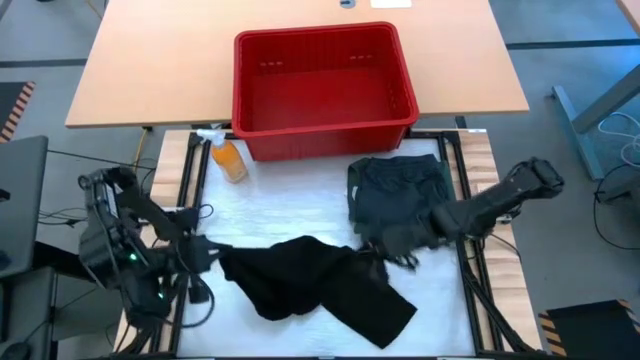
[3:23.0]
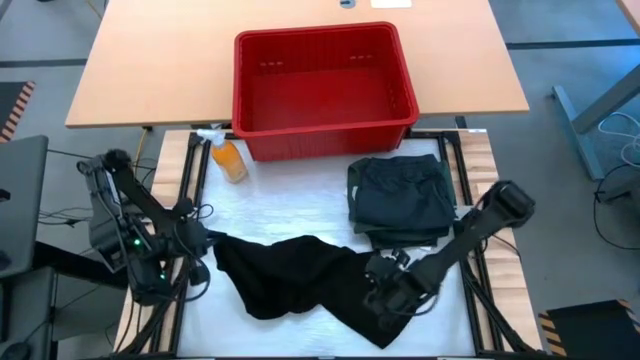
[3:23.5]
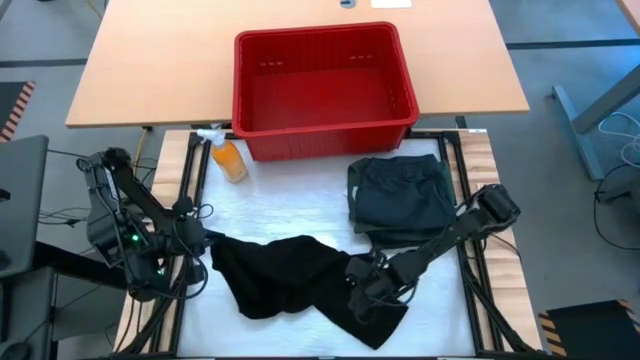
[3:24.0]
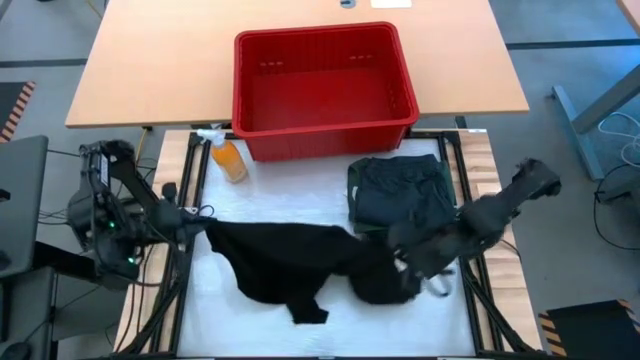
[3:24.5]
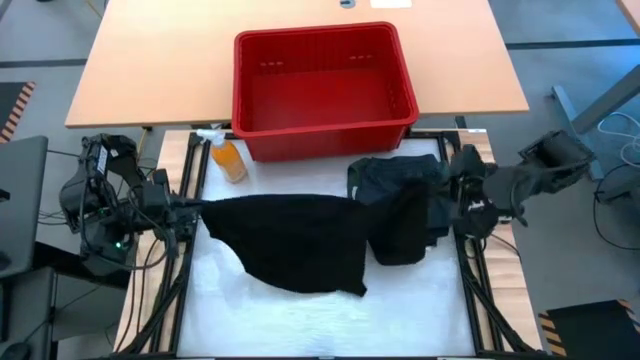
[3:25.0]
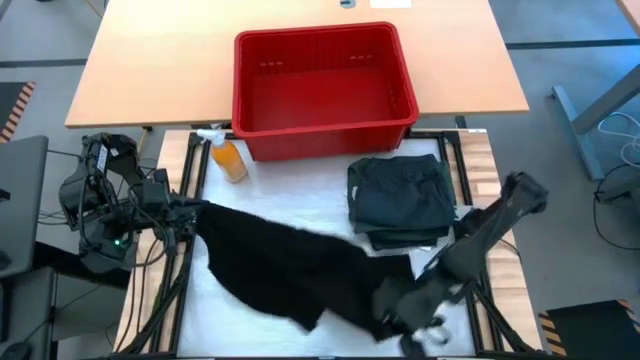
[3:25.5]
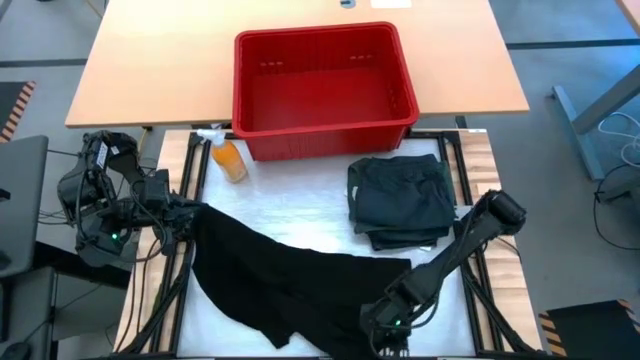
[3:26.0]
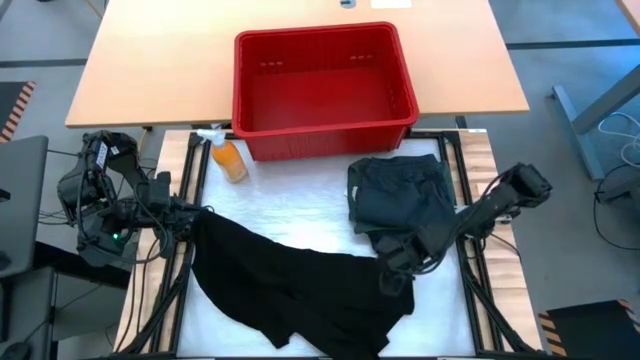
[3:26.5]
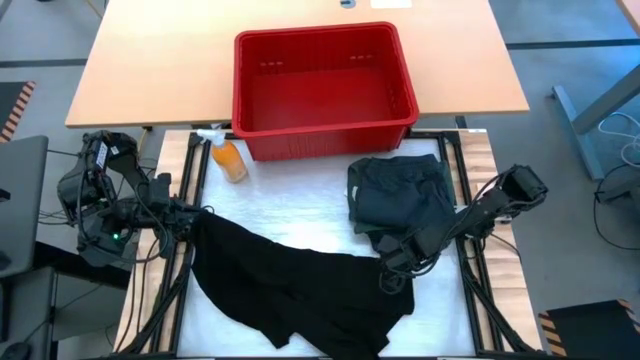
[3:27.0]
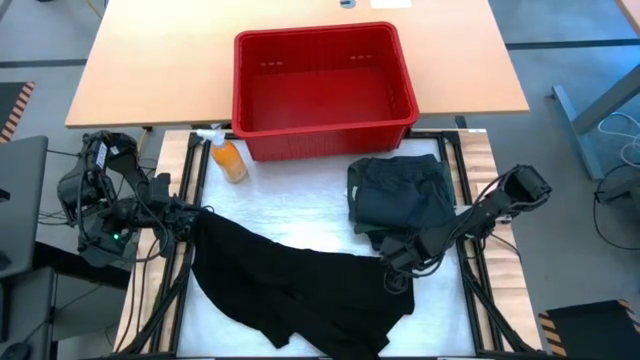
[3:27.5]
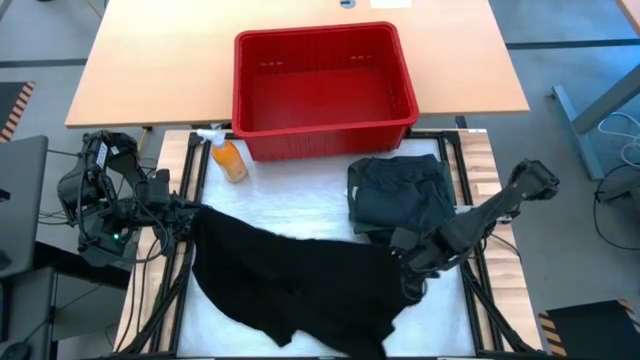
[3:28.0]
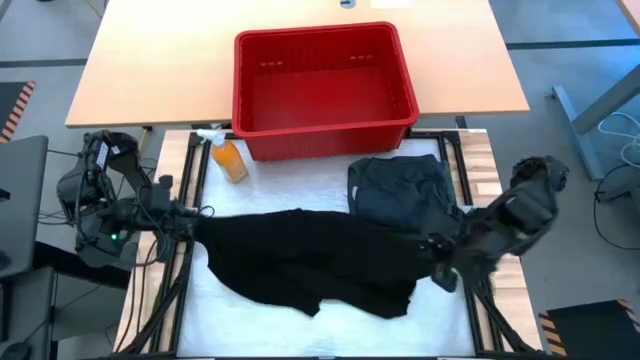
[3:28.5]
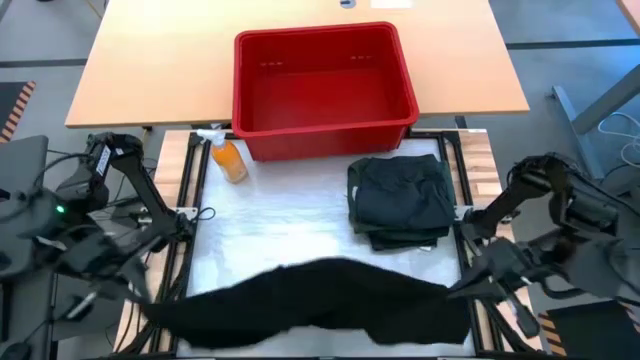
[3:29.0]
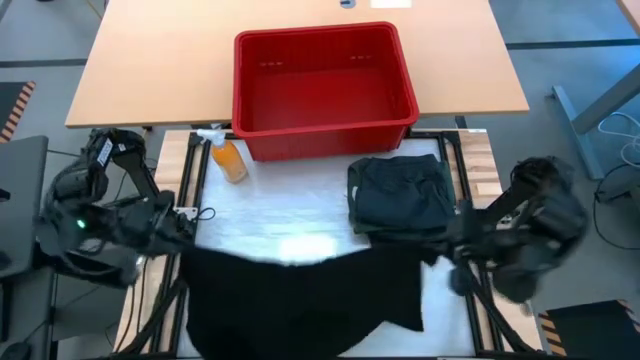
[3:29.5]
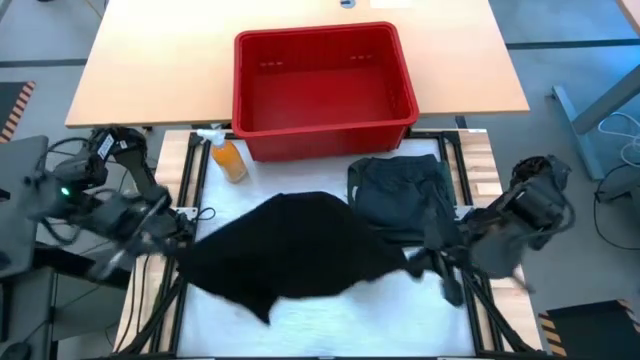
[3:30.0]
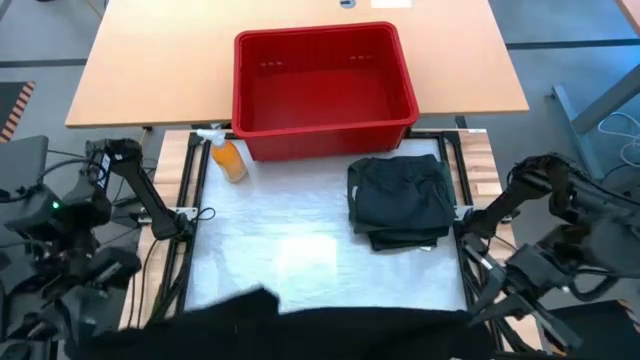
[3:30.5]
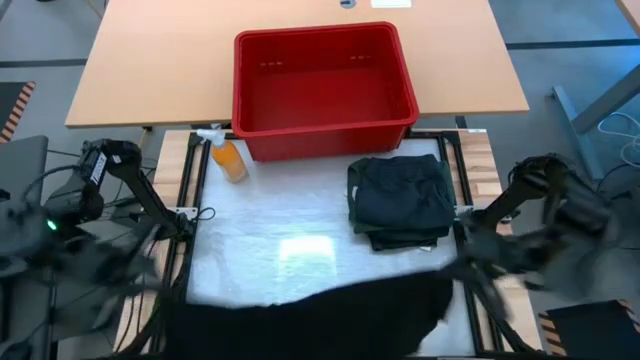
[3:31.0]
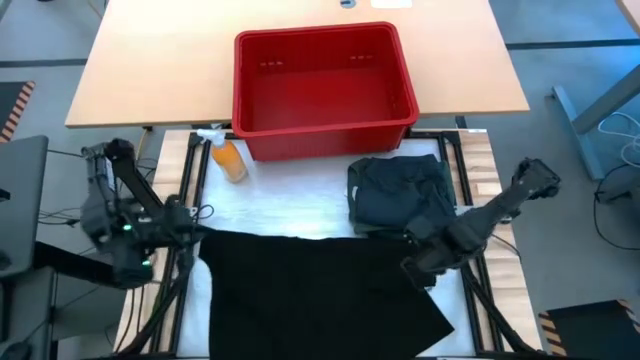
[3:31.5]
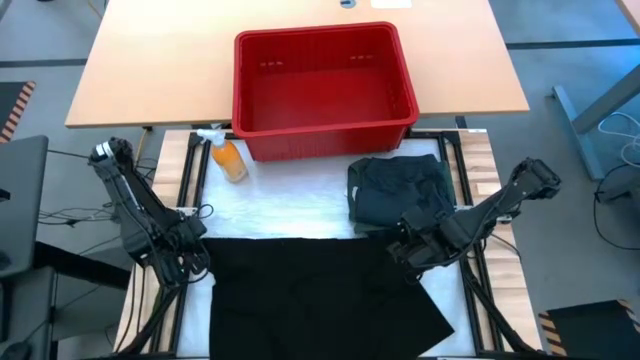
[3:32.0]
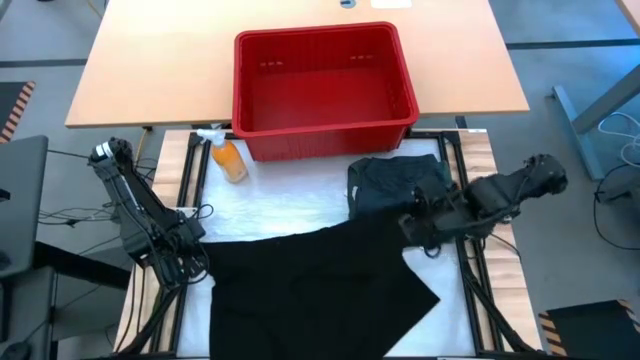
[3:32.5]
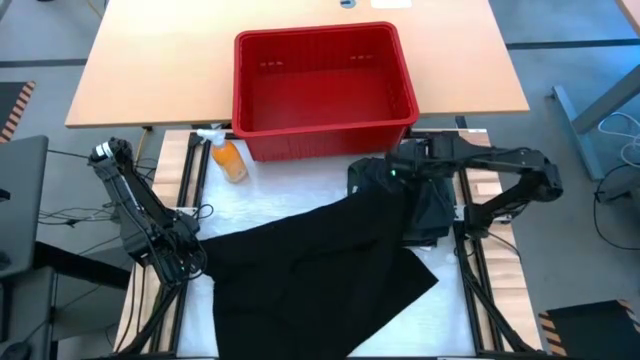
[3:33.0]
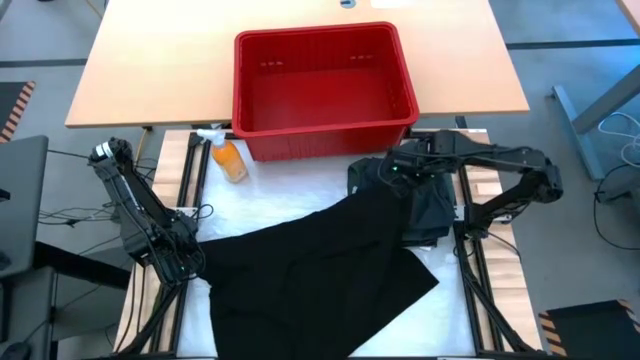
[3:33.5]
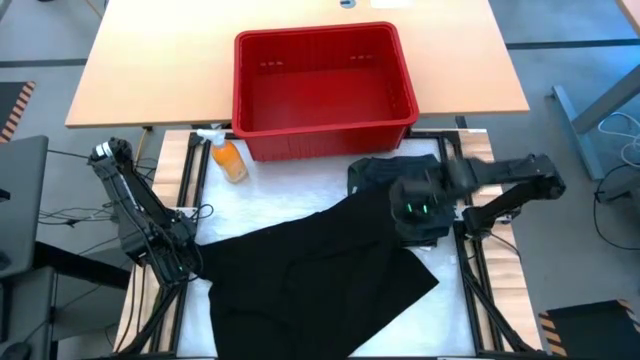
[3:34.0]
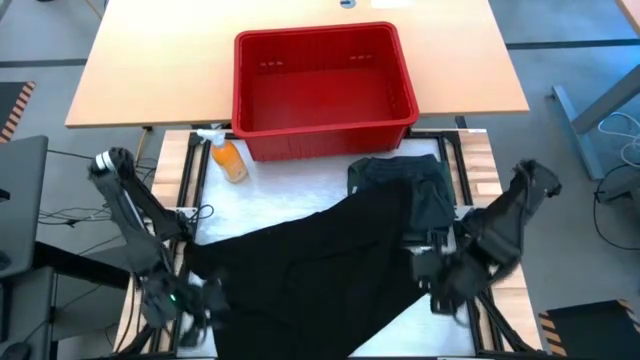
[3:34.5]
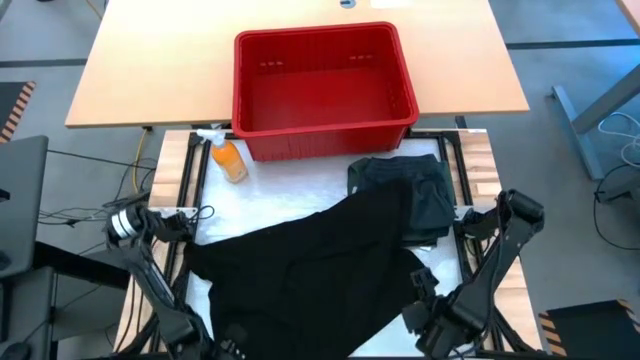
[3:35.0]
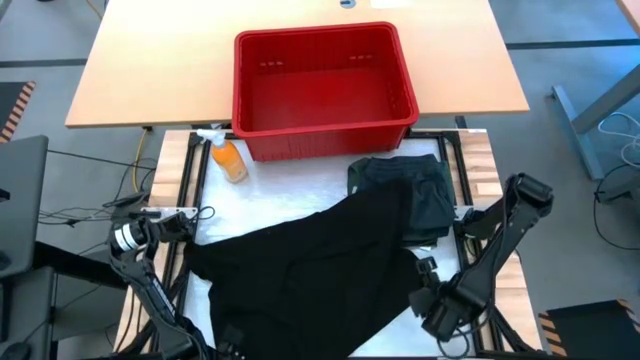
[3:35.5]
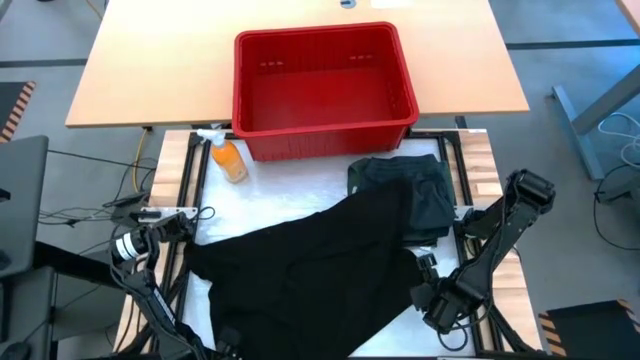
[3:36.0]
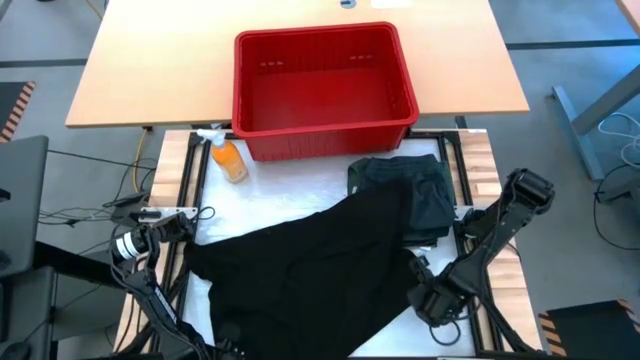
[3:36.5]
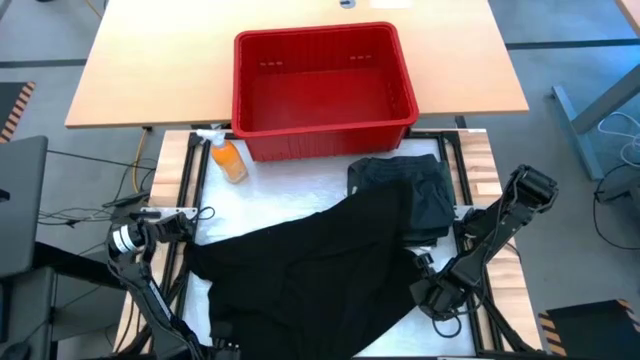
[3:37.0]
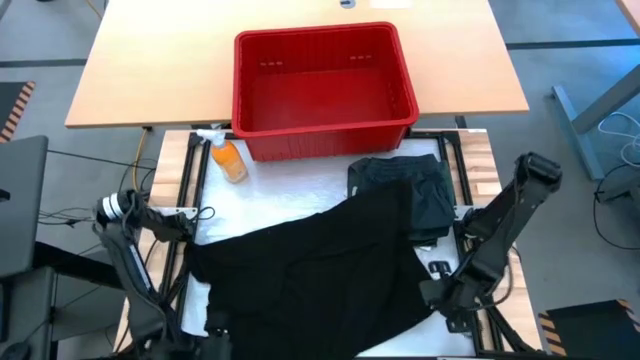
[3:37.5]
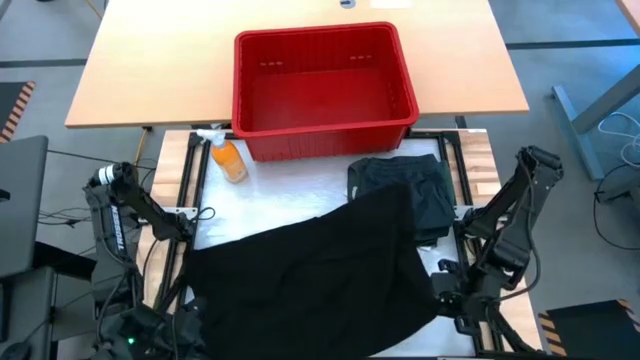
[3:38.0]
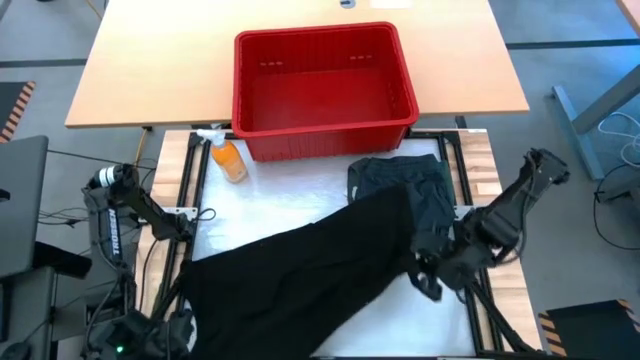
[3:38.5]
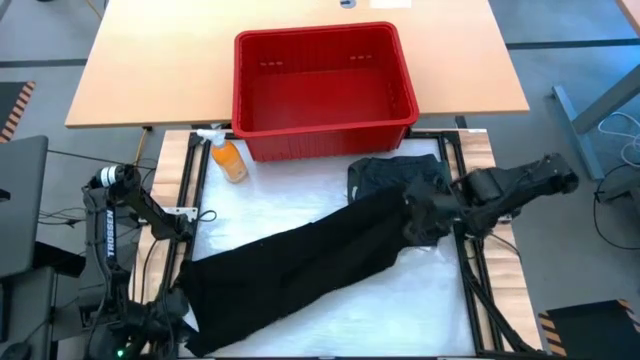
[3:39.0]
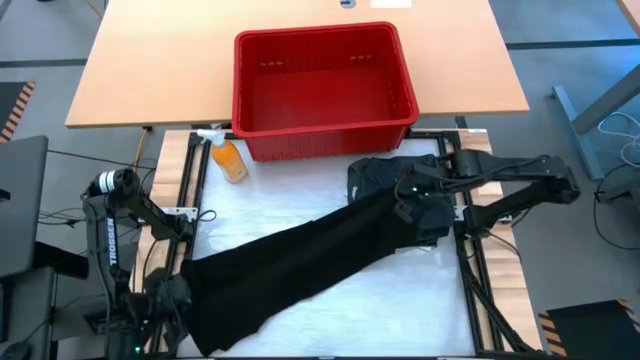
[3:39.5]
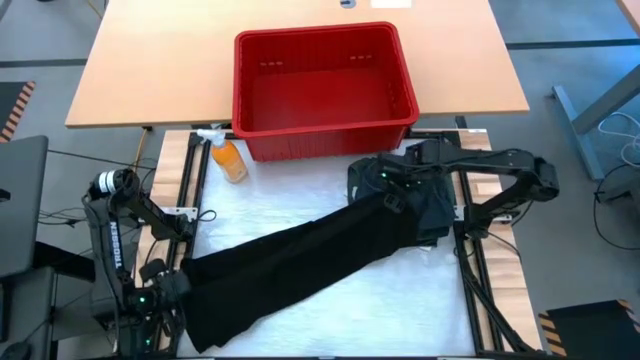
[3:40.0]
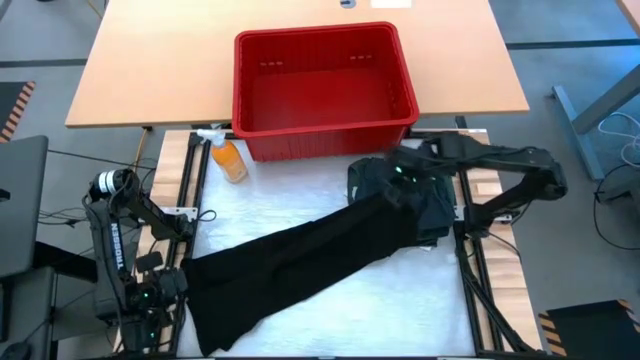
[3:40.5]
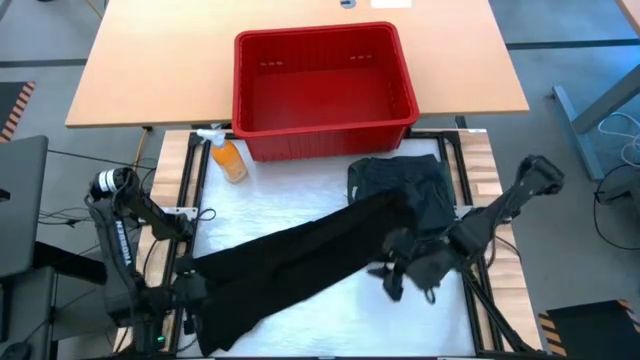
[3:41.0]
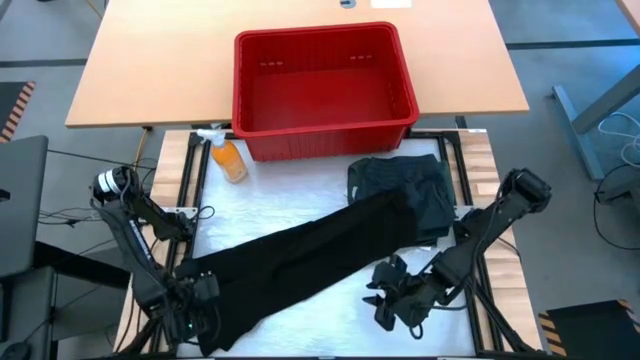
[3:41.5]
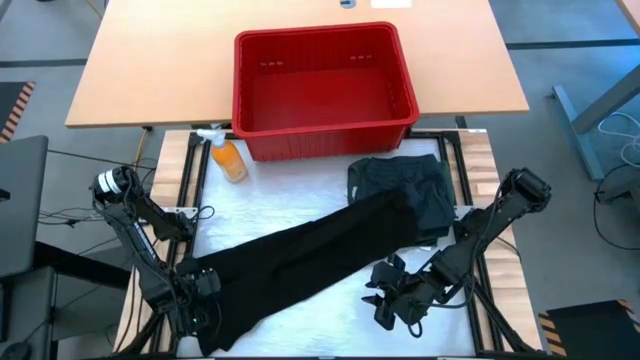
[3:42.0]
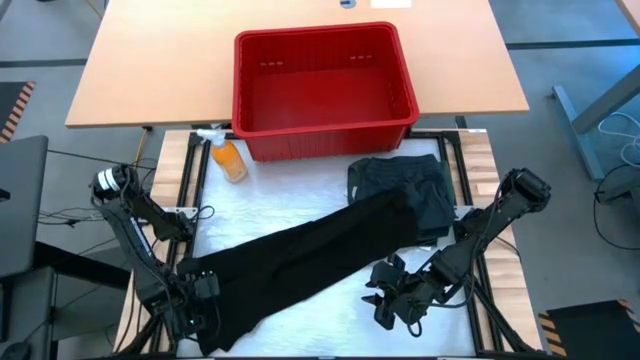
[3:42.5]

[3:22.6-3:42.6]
Task: Fold Laundry from Bin
Fold the black shirt

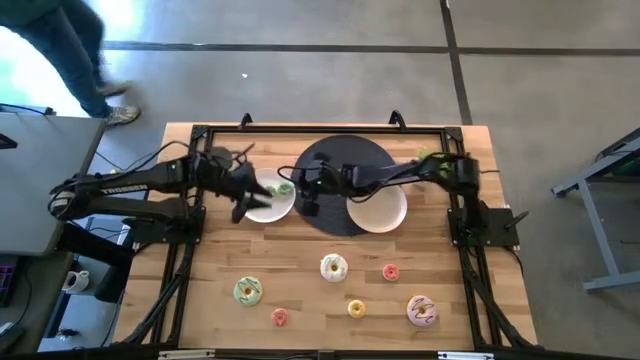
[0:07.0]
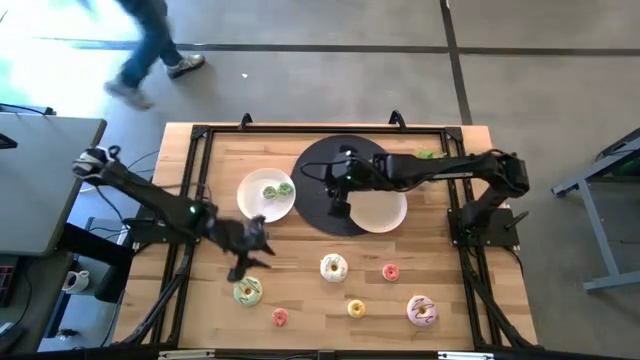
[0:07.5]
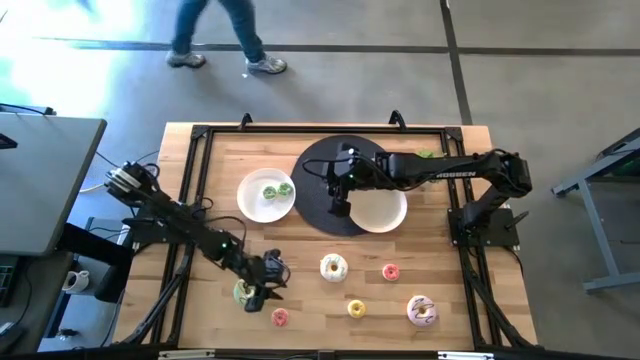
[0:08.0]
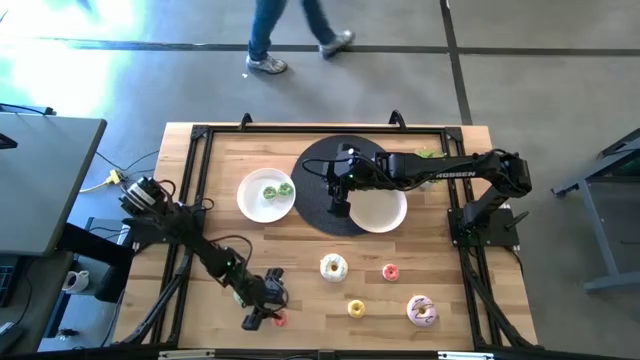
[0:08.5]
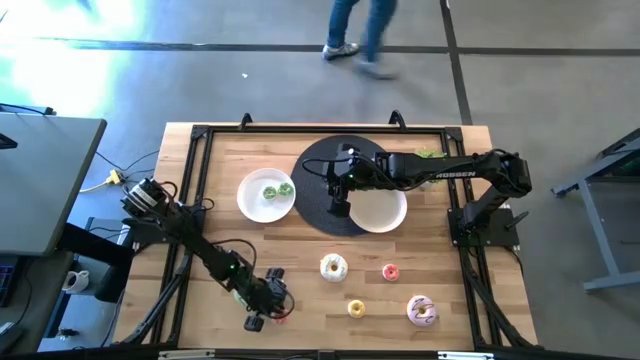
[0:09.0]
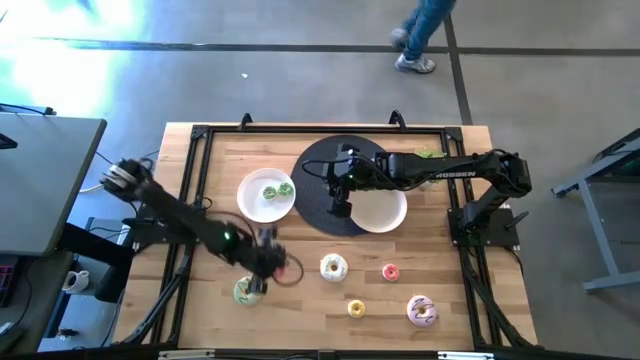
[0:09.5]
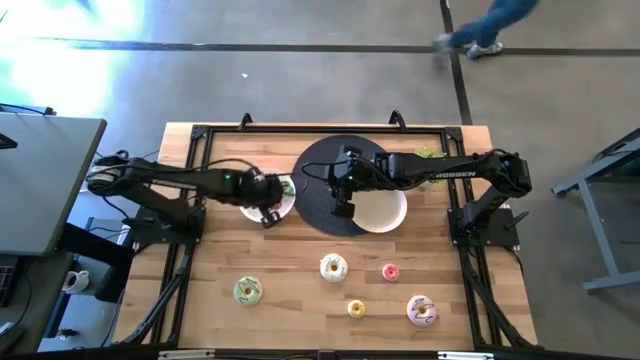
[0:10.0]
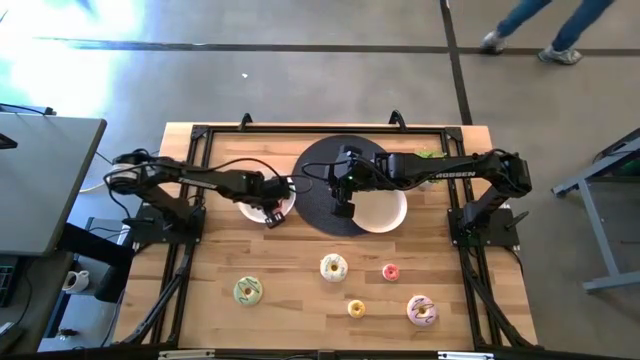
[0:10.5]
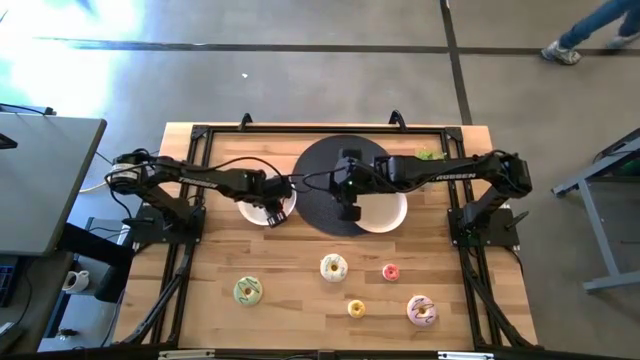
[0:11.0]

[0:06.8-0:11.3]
Task: Pick & Place donuts
Put the left small pink donut into the white plate
